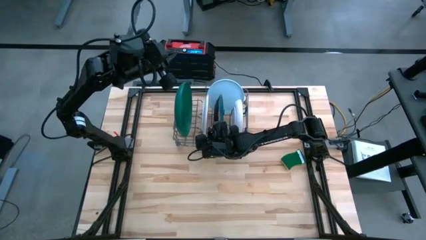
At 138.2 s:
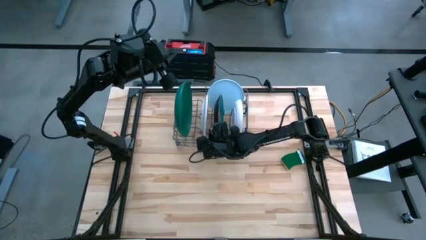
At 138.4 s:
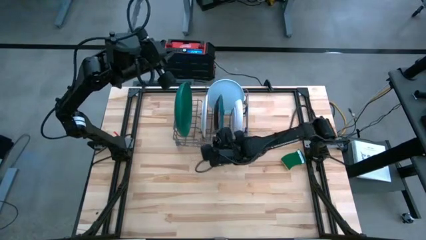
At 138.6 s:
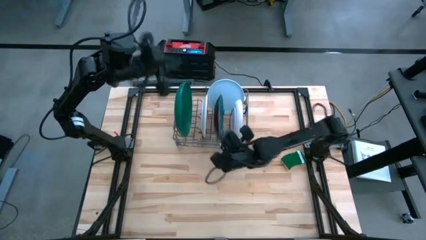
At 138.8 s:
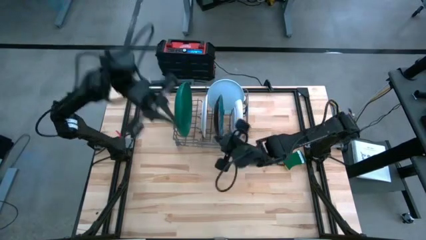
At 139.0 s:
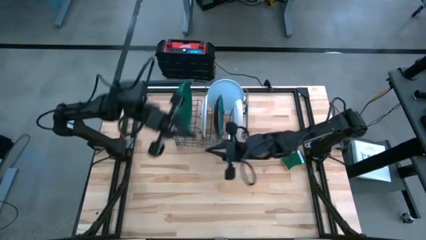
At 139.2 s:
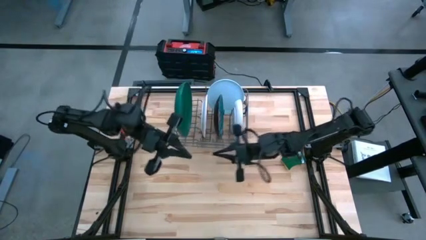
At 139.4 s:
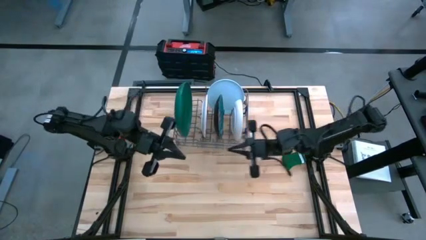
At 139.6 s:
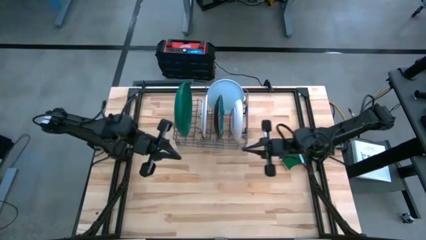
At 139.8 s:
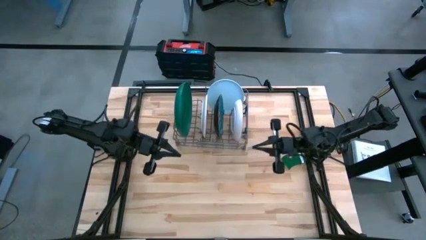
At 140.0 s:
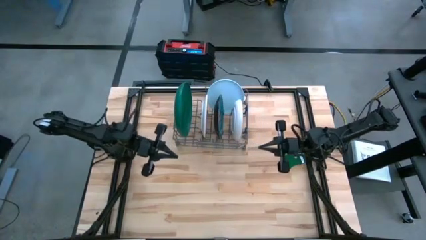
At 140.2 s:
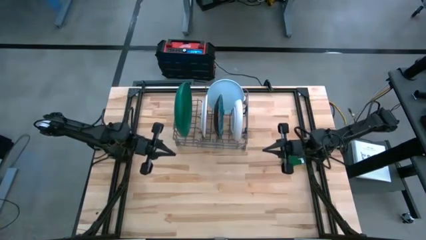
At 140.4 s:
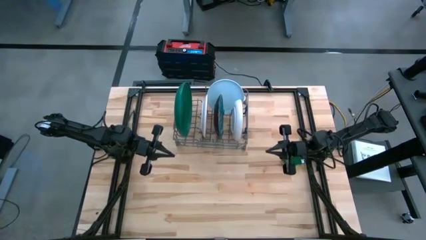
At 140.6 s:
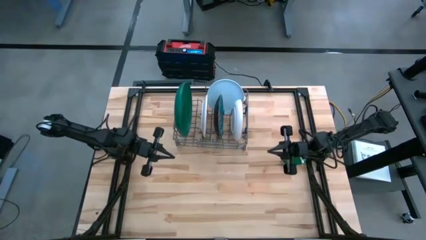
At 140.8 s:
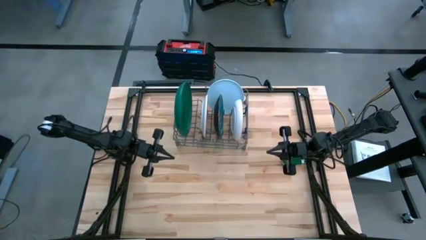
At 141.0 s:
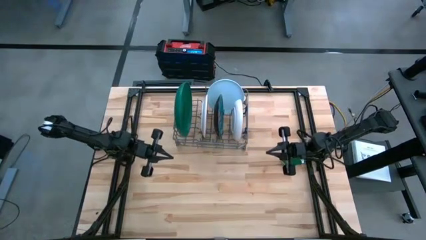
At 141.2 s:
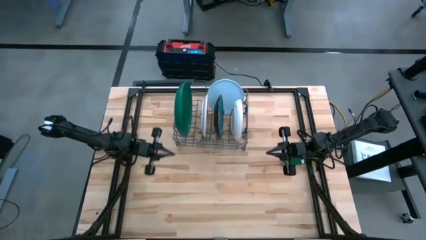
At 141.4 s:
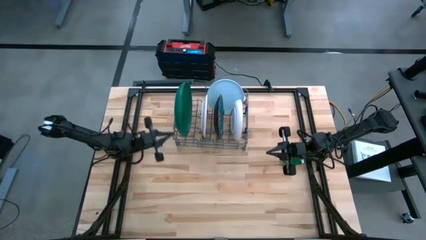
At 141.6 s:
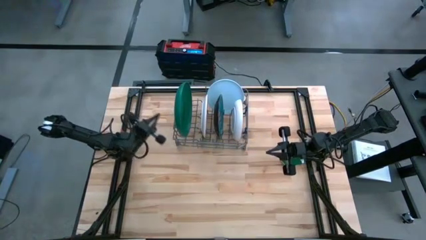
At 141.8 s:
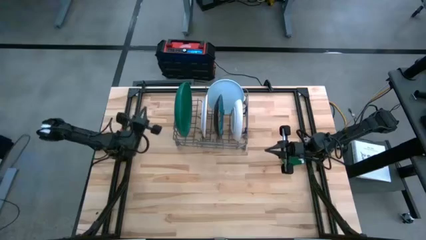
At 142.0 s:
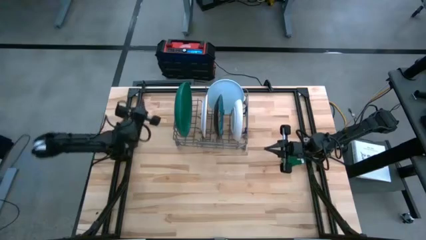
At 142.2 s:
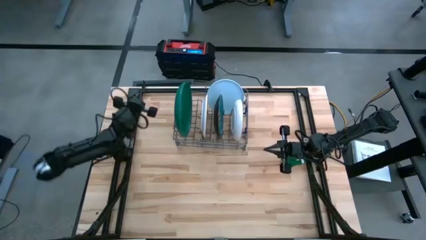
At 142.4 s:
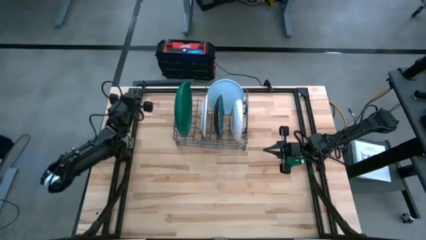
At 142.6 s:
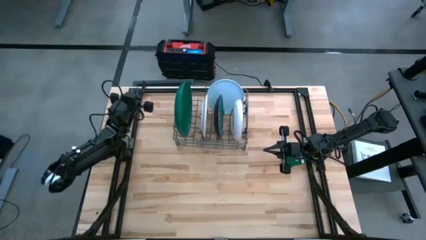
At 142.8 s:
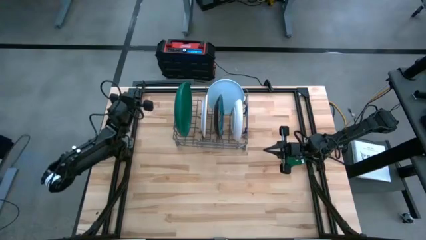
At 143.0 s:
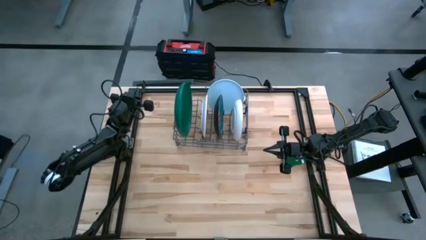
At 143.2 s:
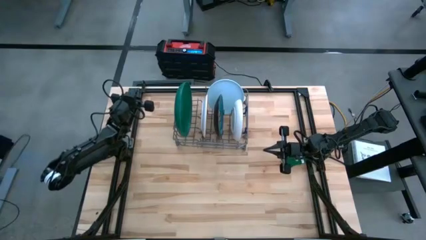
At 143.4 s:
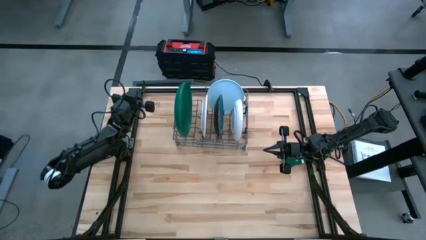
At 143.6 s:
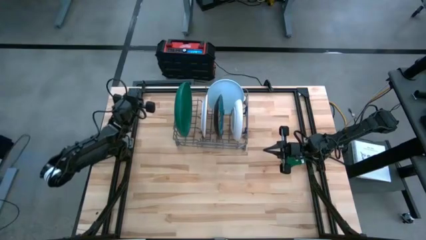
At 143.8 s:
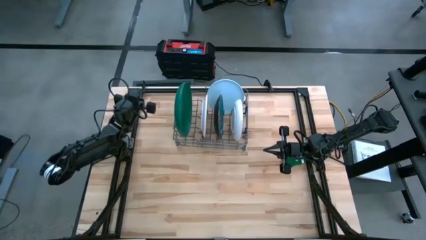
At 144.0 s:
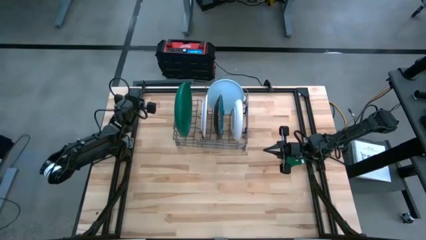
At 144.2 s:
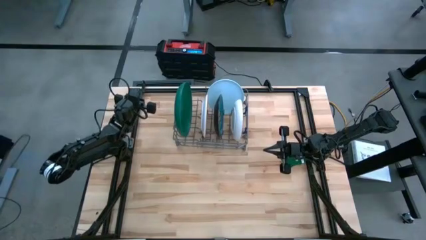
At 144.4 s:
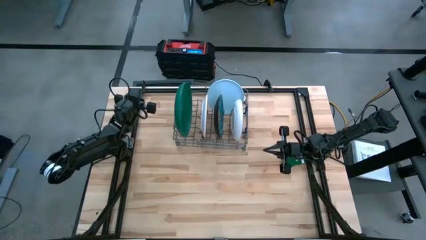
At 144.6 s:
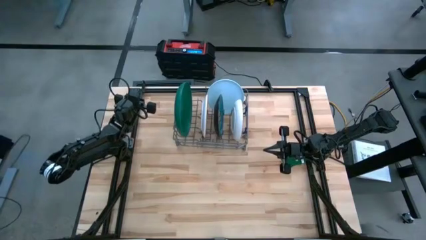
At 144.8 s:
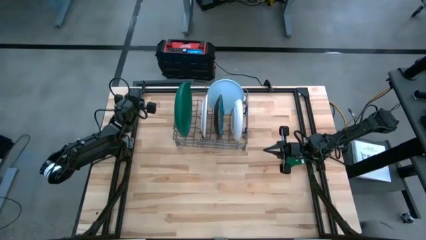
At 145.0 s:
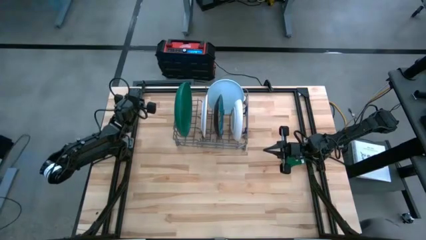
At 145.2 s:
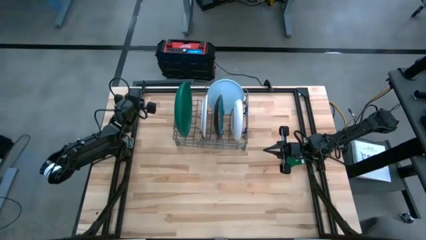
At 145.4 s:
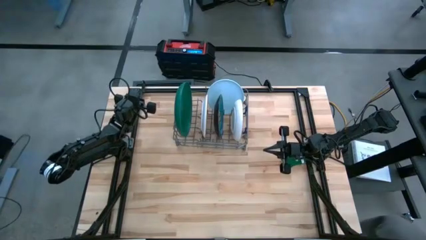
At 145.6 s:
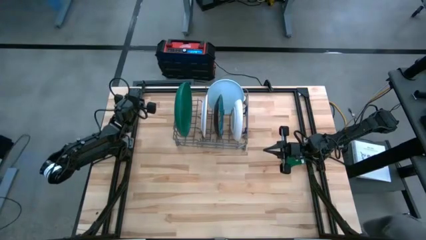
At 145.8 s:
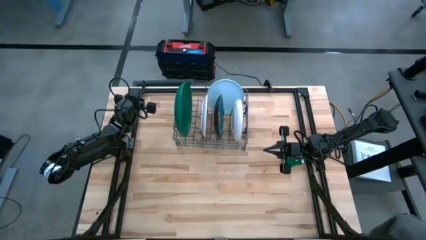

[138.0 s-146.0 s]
Task: Sort dishes
Return to Home Position

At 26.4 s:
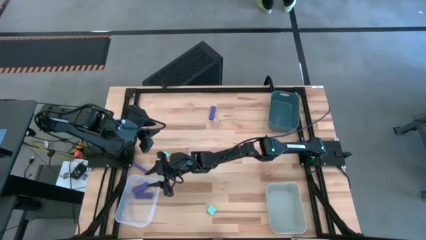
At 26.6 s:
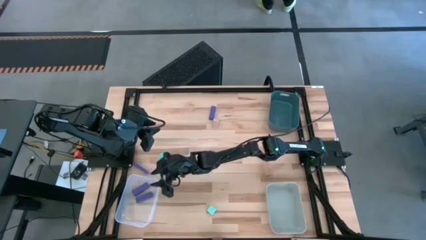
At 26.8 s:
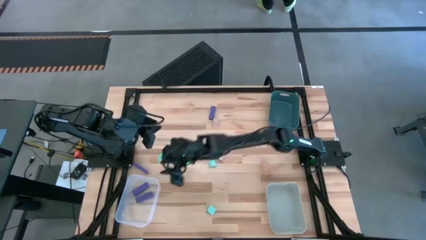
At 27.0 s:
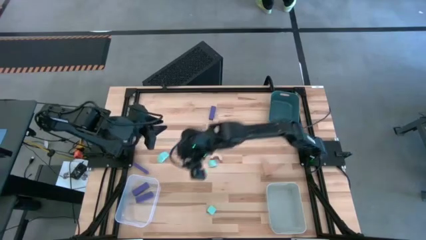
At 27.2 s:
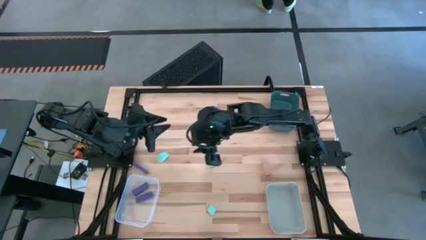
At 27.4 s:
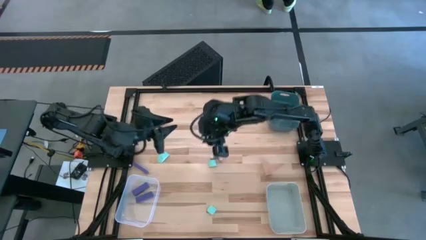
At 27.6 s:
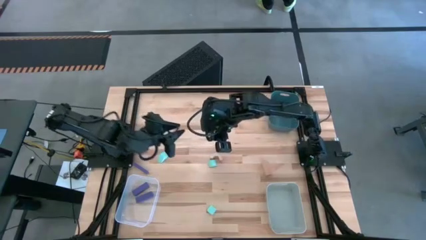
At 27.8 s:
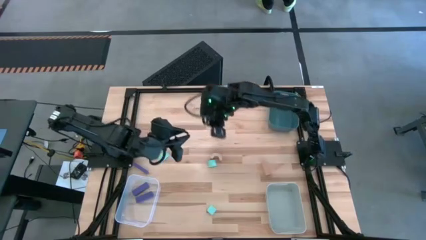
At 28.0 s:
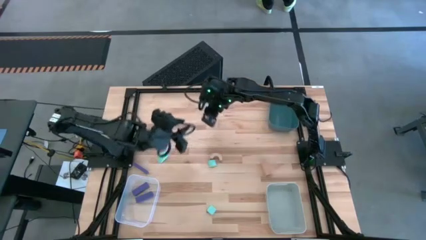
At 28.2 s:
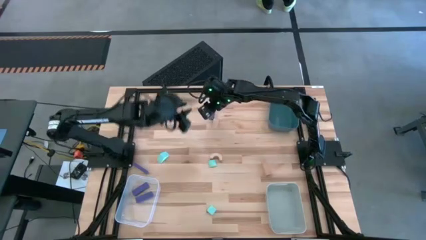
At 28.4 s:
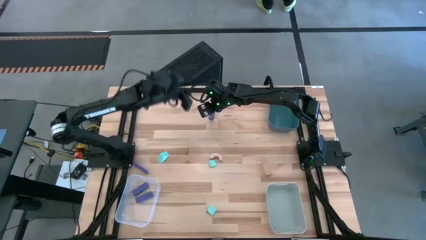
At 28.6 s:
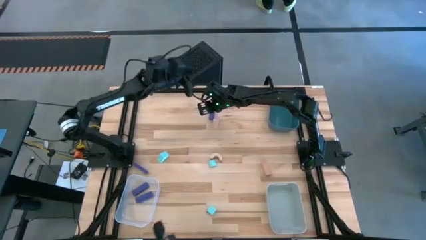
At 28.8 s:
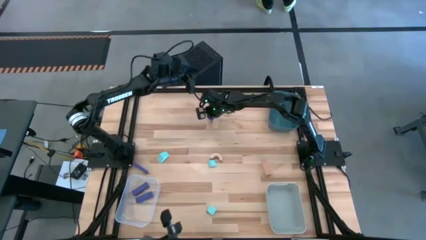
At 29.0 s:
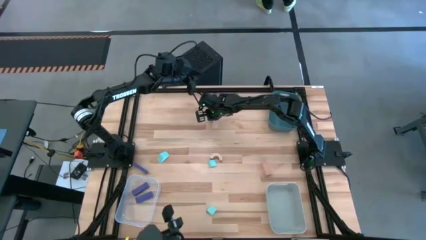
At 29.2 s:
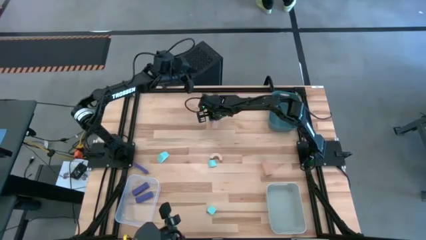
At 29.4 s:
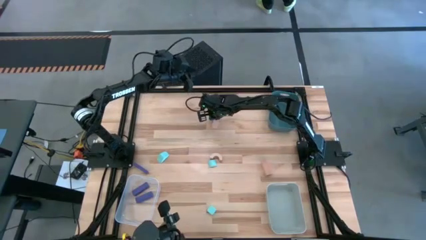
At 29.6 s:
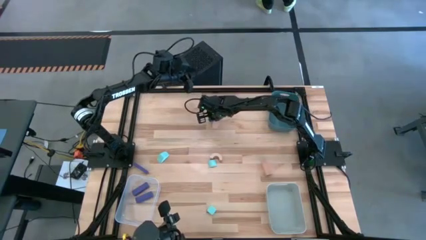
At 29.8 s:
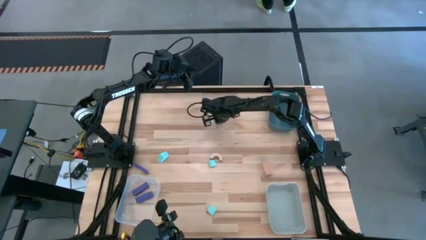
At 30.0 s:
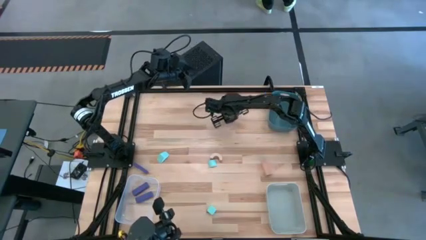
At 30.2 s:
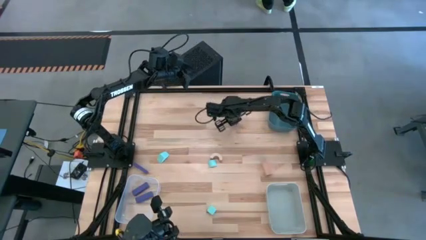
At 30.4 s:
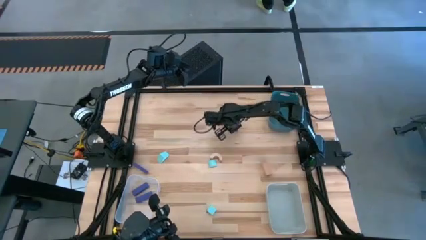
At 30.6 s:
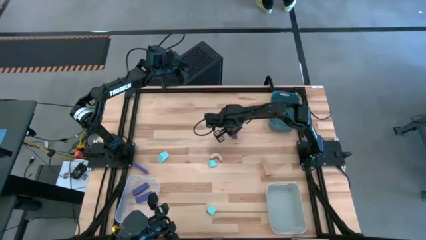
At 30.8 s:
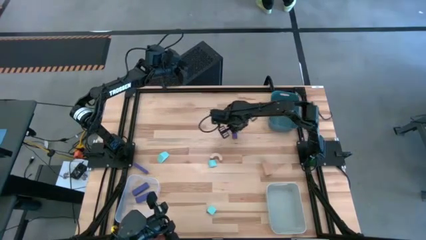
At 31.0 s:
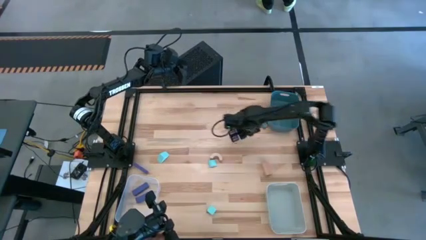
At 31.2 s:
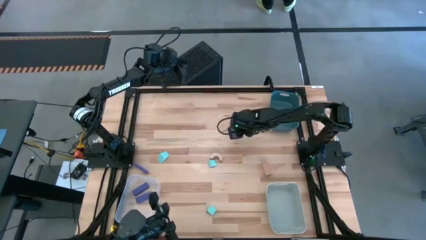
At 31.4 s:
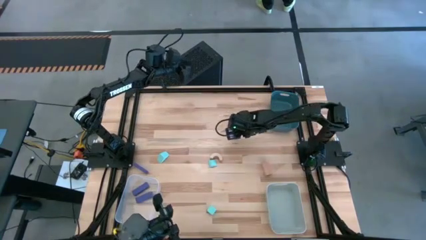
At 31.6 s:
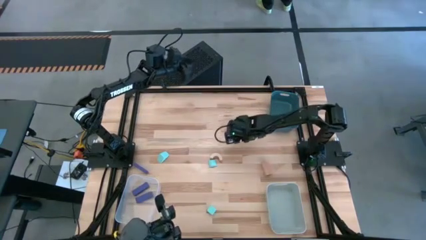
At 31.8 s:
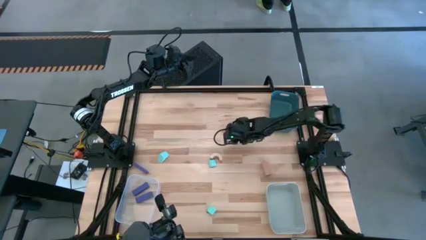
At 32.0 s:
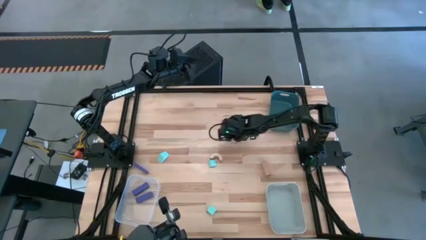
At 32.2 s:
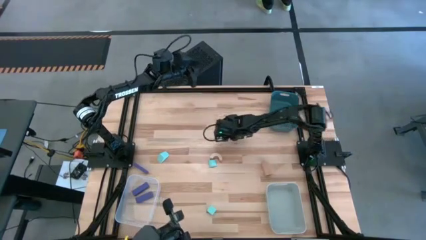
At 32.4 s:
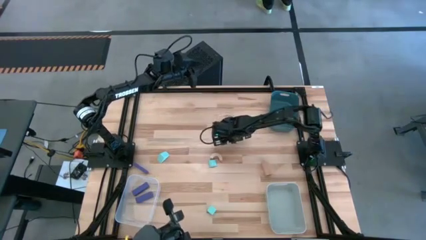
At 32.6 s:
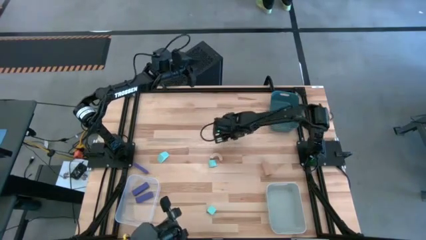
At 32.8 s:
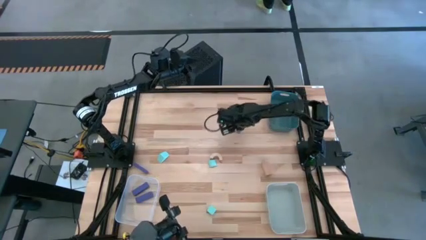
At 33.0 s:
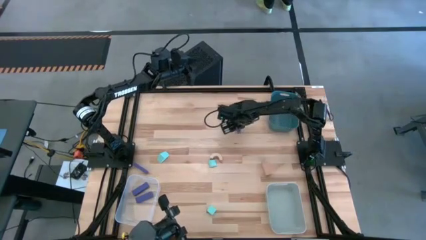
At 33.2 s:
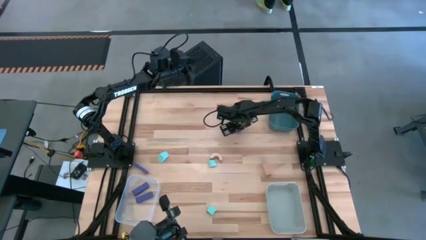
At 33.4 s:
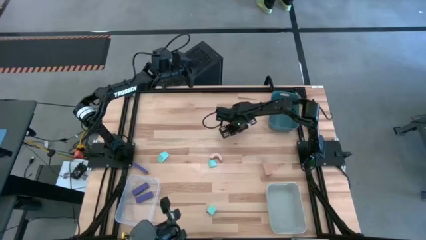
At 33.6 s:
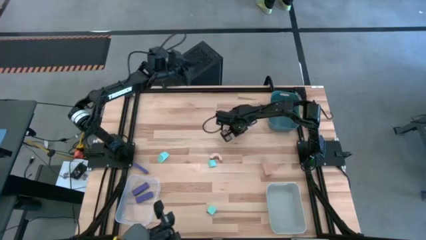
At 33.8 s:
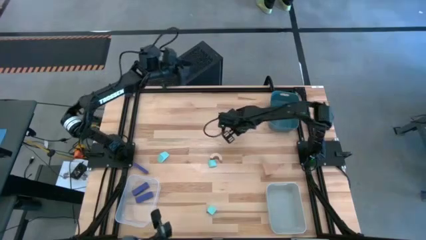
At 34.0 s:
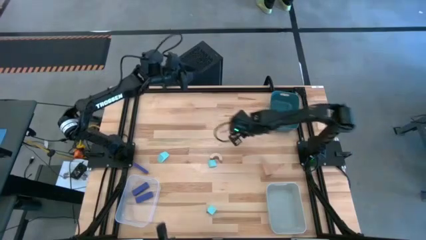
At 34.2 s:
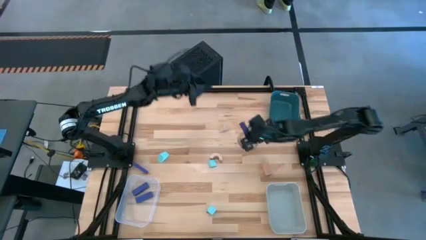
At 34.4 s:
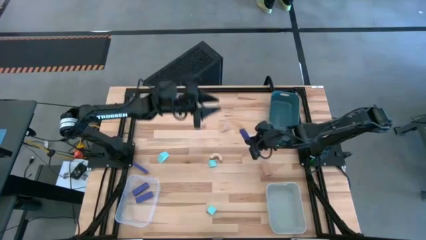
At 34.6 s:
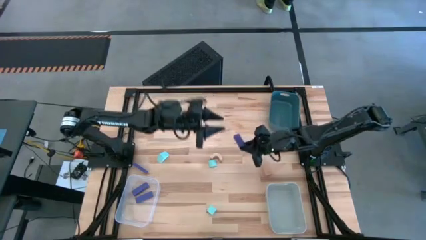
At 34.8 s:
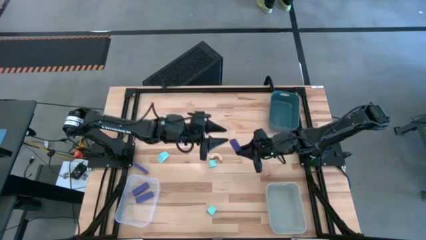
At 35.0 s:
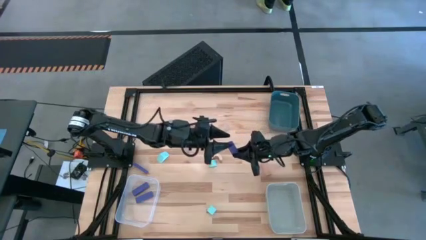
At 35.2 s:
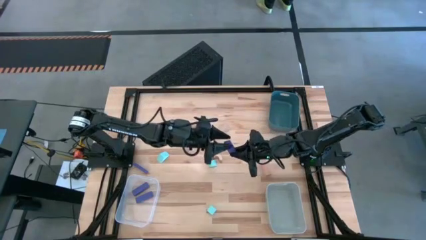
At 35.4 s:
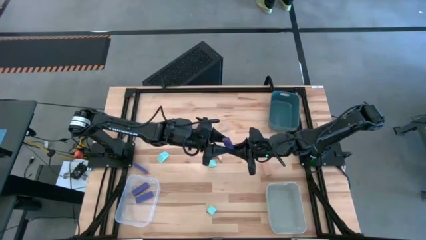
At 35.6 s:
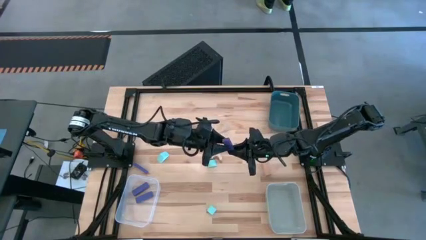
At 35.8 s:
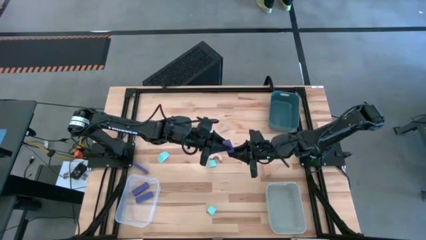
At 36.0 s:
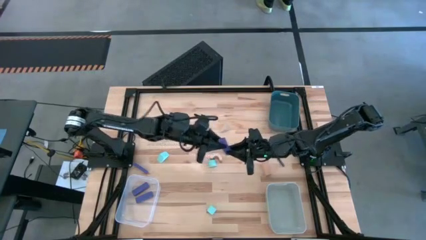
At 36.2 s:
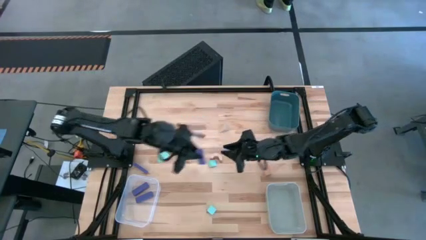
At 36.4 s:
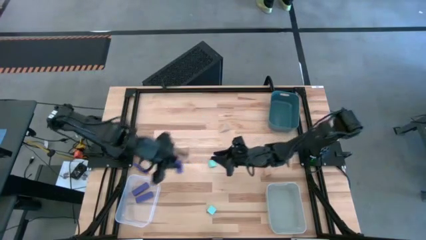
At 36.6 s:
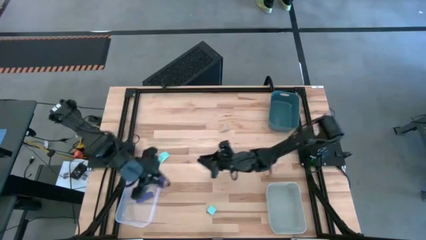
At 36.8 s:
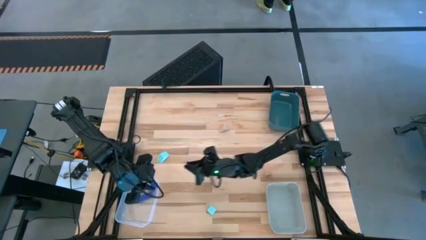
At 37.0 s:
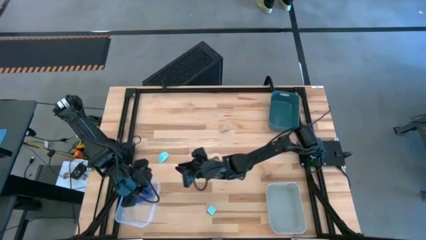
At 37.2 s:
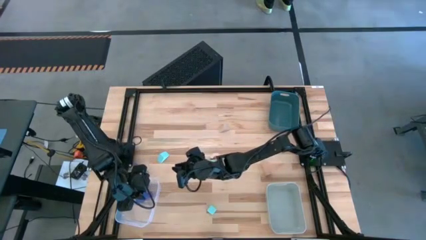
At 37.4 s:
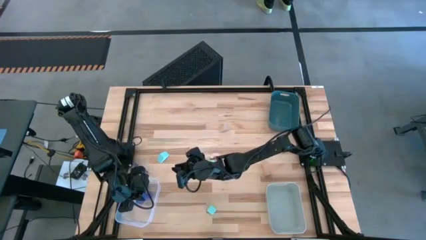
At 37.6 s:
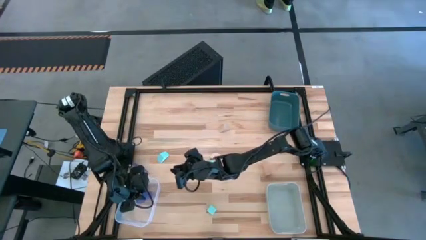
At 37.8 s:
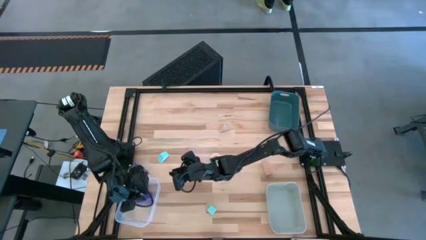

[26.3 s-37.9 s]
Task: Sort & place blocks by color
Put the top purple block into the transparent bin
